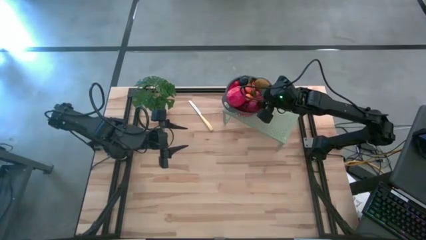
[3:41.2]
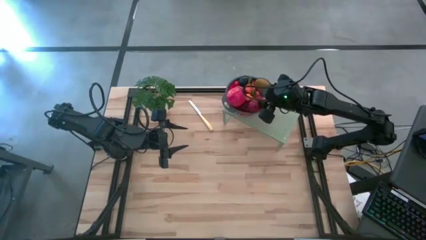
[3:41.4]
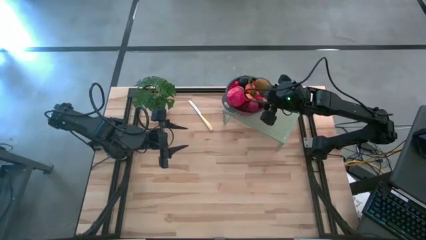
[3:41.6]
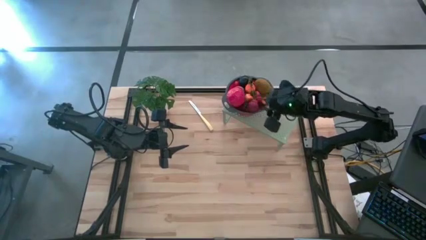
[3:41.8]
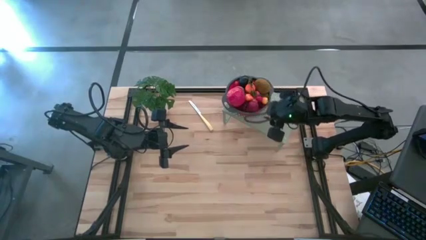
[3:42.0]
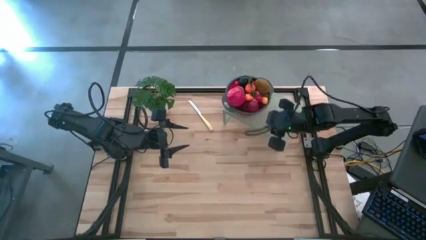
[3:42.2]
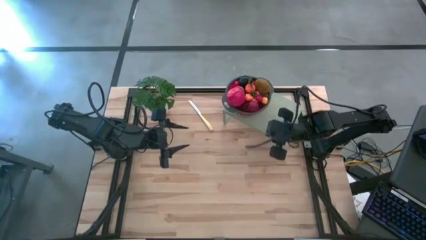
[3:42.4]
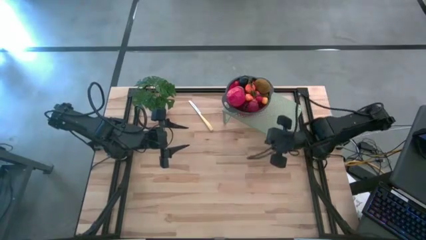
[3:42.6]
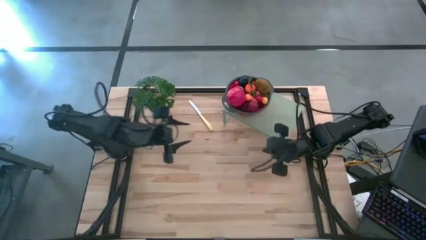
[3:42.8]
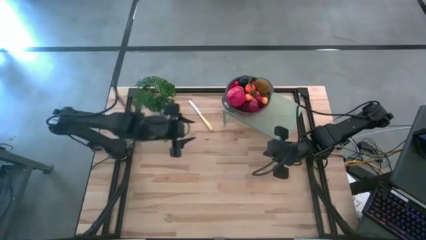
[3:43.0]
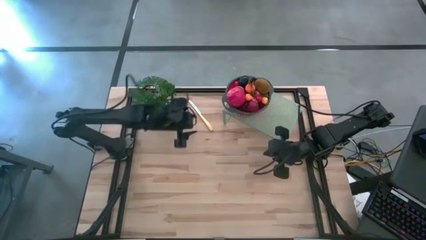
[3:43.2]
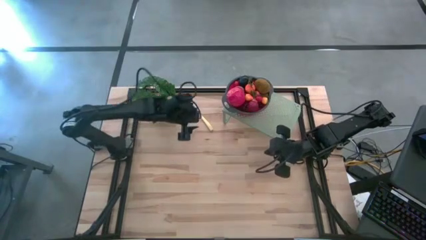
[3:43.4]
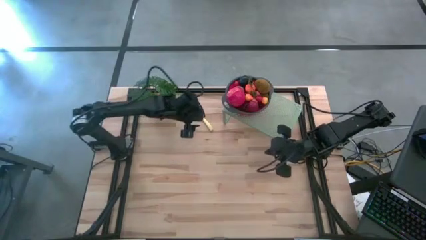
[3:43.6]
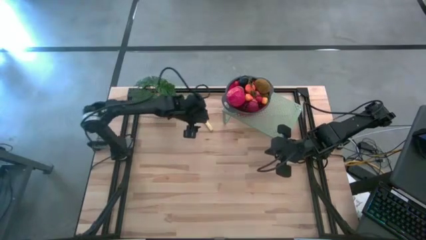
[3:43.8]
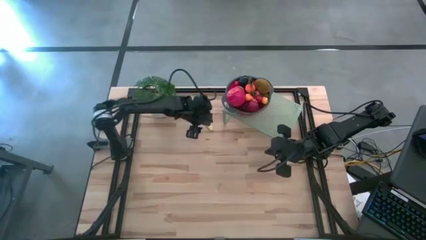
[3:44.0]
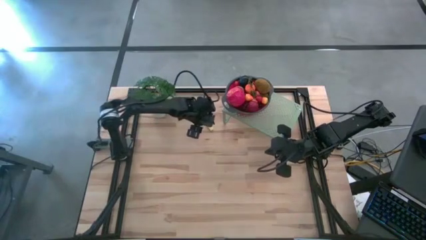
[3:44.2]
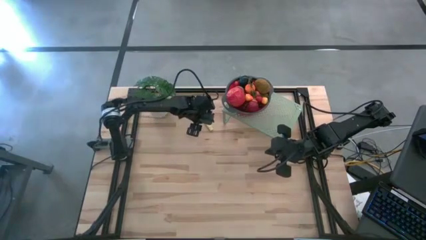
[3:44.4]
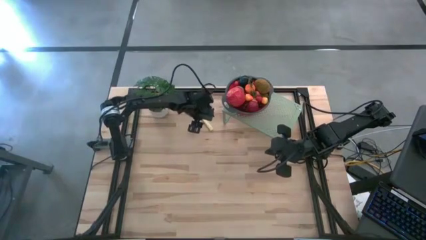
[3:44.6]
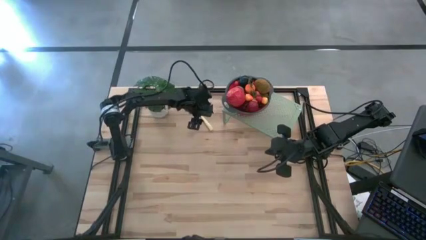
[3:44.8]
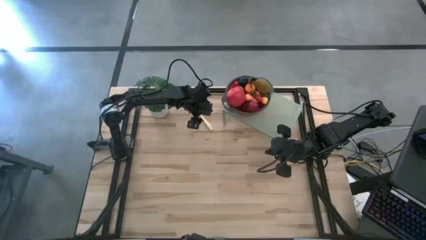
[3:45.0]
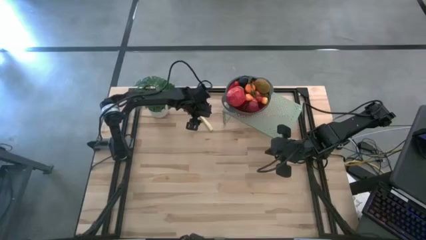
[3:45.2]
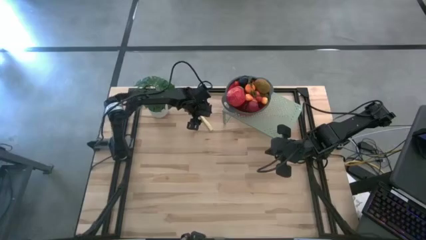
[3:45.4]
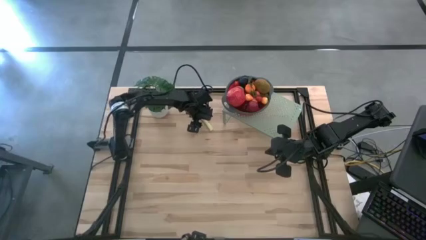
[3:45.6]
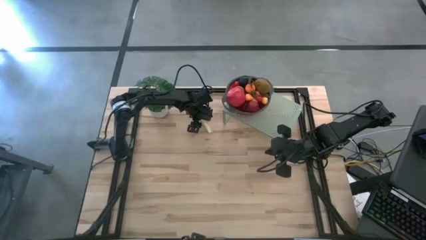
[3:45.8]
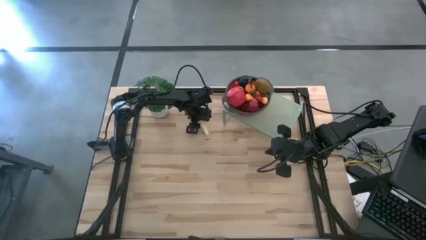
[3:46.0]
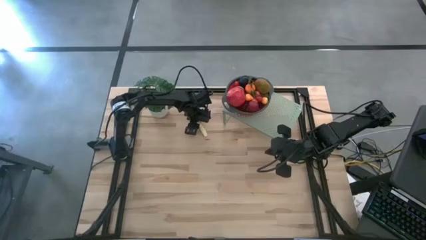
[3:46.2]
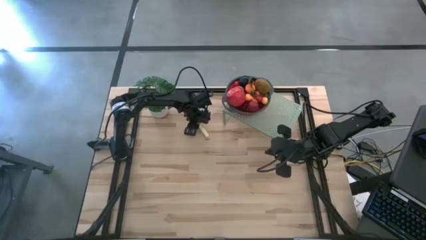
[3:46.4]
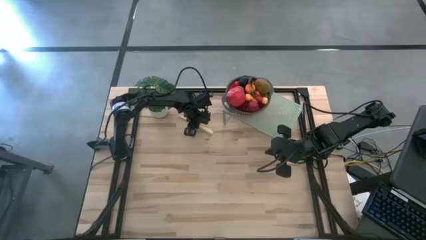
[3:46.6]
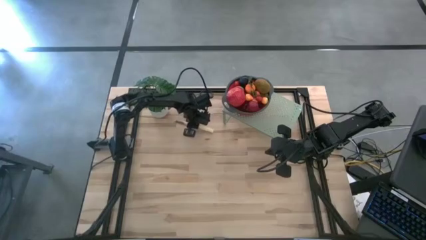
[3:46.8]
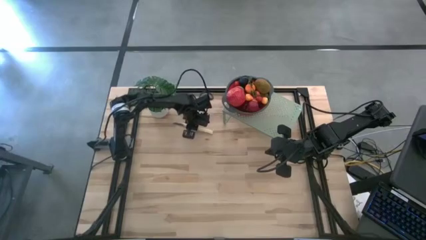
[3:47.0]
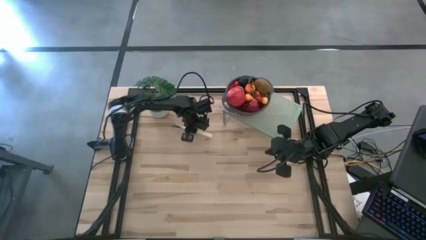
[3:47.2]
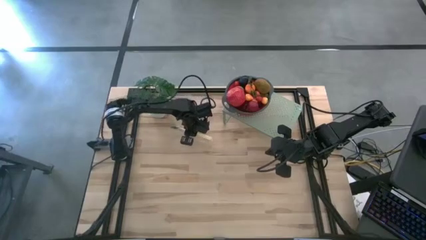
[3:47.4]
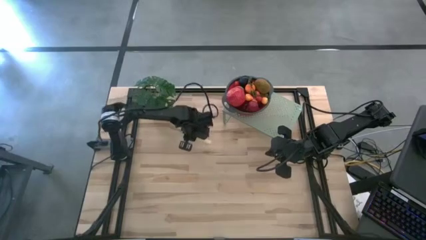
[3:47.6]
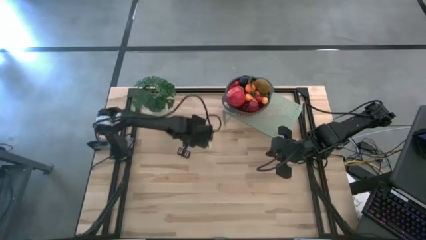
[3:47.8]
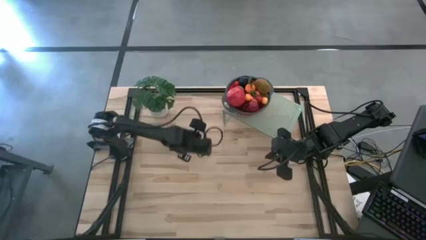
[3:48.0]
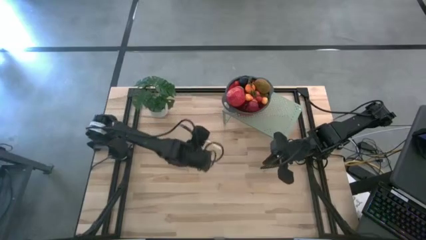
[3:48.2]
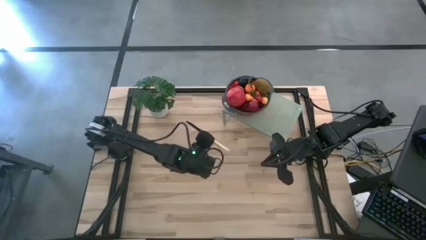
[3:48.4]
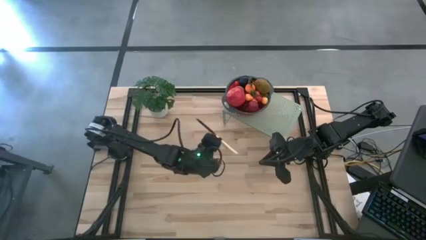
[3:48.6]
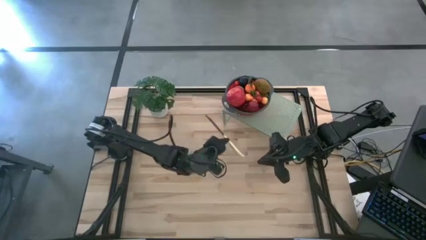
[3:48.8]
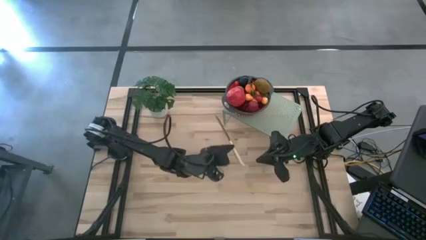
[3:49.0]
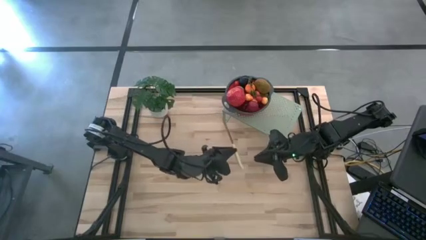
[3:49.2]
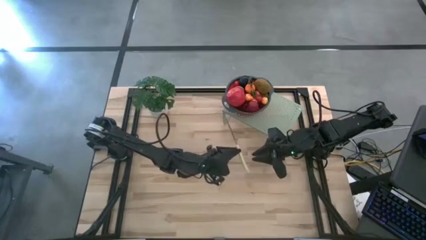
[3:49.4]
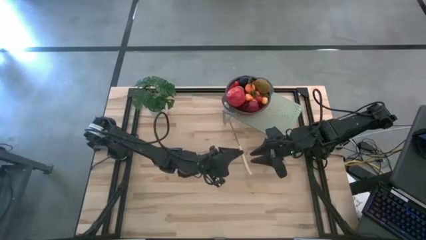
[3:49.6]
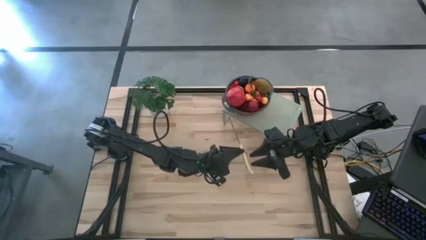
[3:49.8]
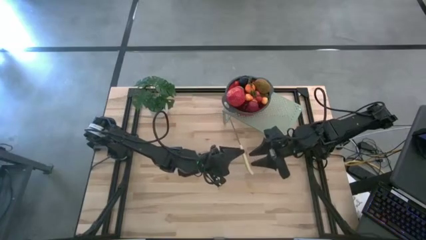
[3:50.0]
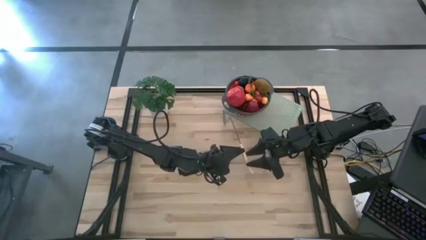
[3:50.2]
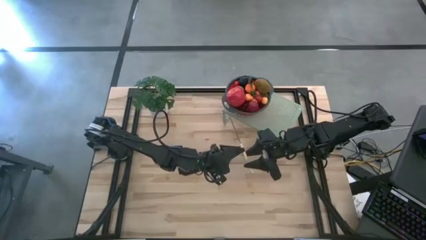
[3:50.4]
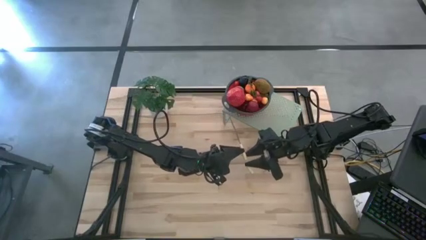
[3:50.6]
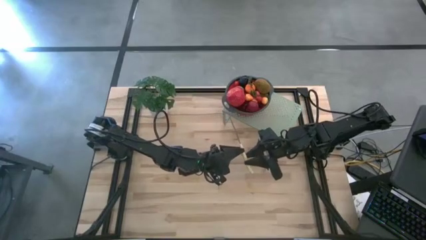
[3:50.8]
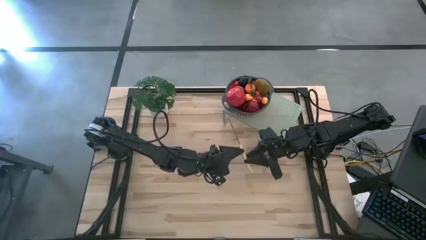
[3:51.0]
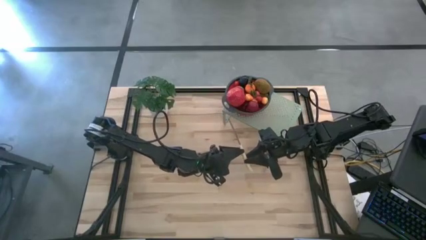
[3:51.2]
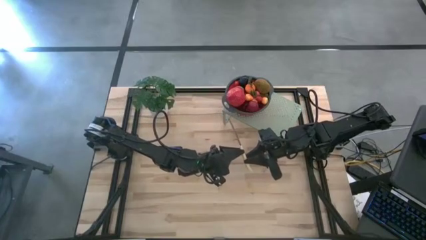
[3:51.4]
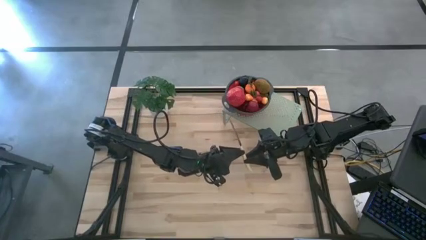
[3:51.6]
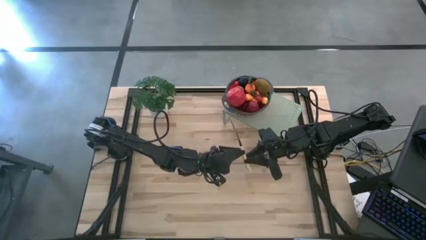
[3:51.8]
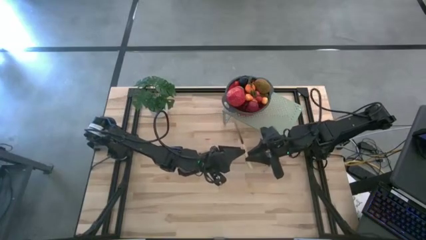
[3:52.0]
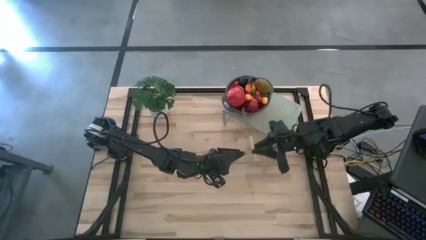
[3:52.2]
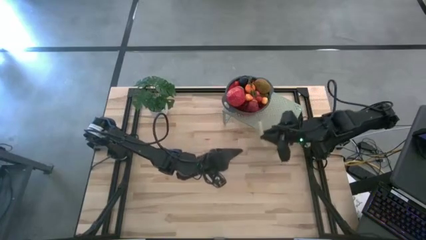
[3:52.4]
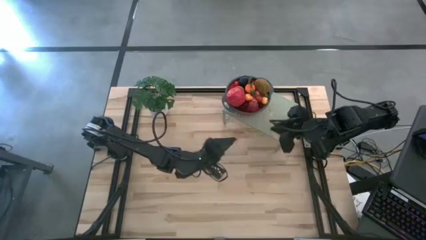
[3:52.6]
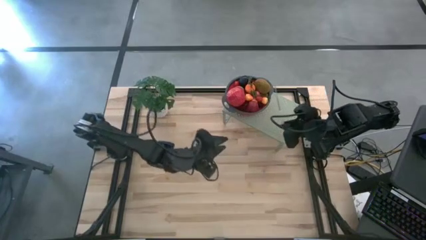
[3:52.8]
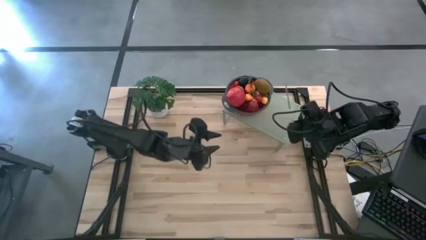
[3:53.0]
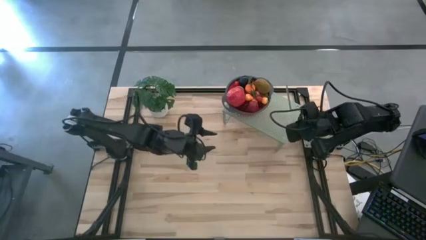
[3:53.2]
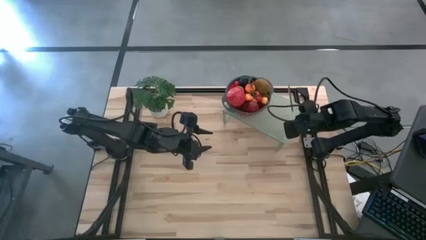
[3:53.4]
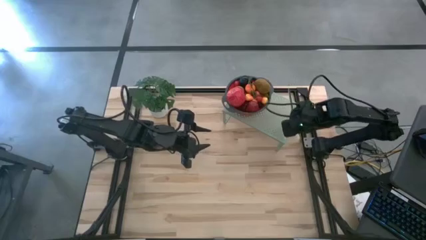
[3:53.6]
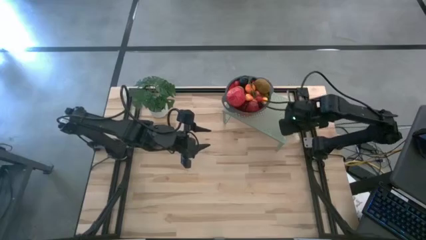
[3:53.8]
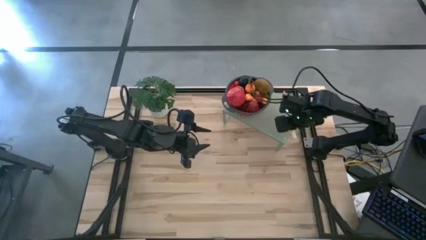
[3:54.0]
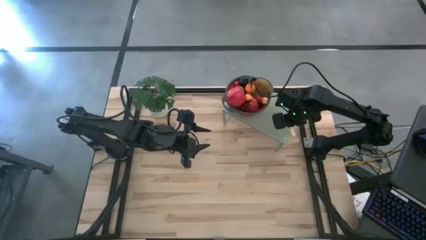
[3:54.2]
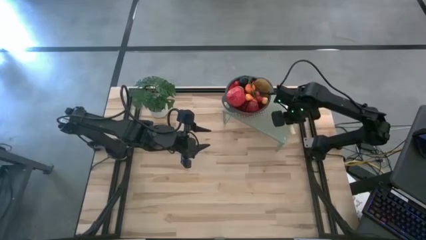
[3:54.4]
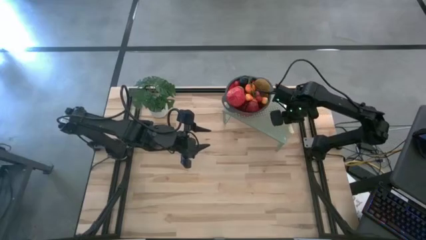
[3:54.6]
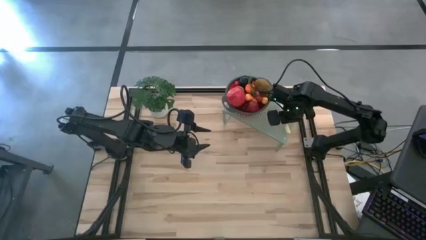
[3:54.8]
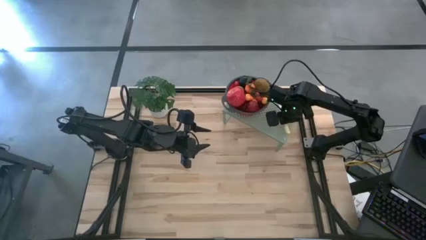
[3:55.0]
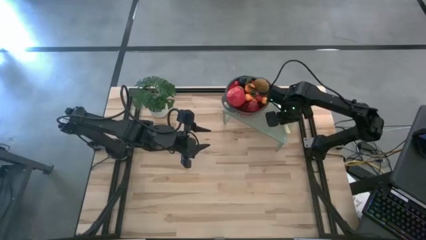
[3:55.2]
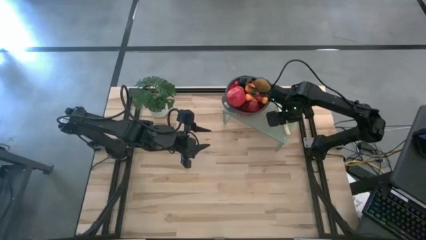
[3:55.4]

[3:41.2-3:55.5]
Task: Pick & Place Fruit
Put the yellow table knife on the shelf
